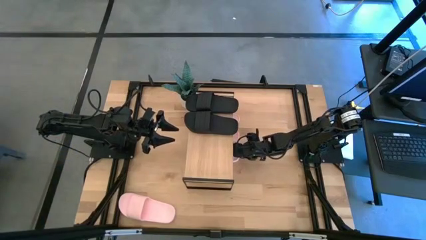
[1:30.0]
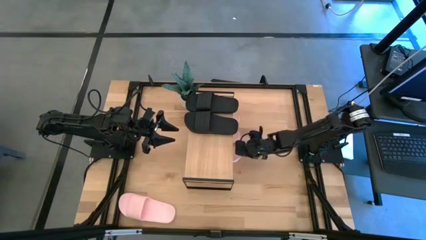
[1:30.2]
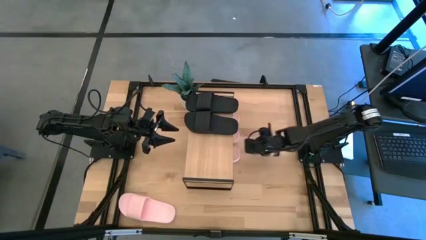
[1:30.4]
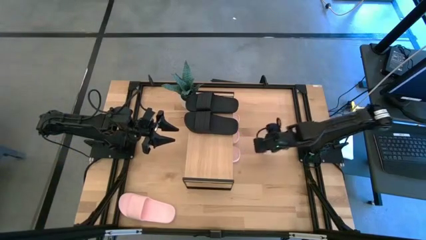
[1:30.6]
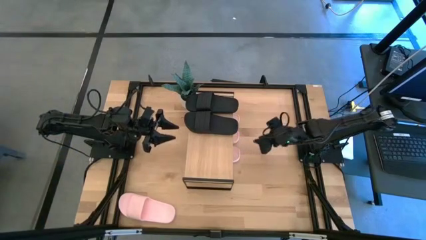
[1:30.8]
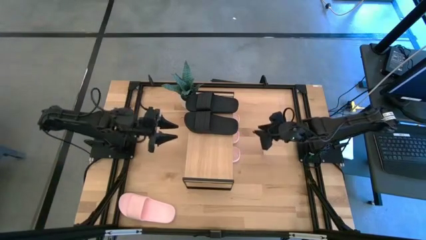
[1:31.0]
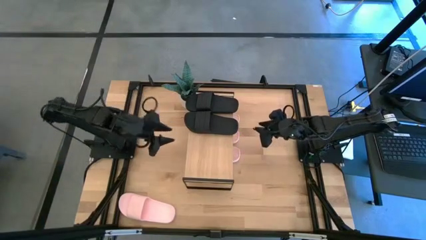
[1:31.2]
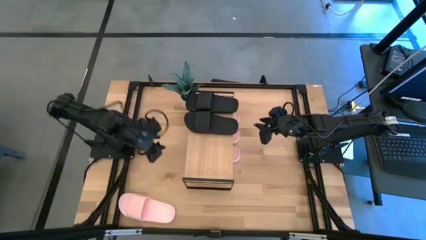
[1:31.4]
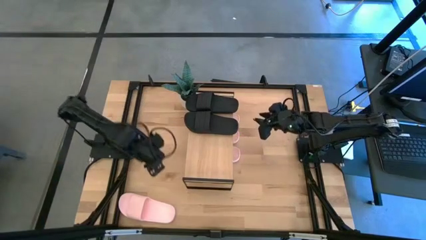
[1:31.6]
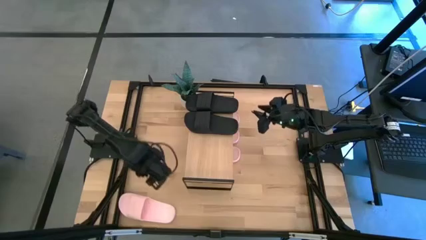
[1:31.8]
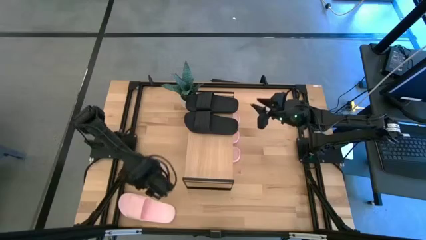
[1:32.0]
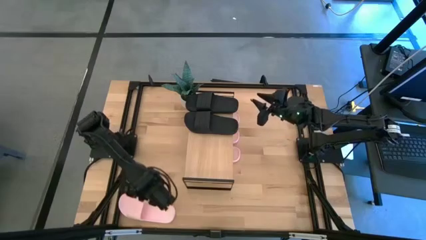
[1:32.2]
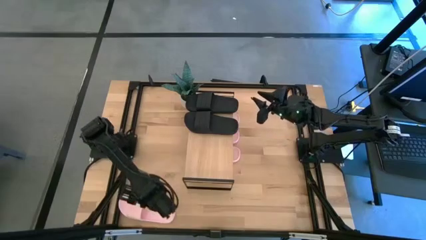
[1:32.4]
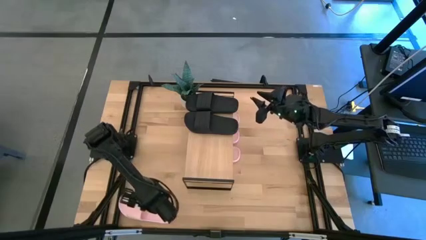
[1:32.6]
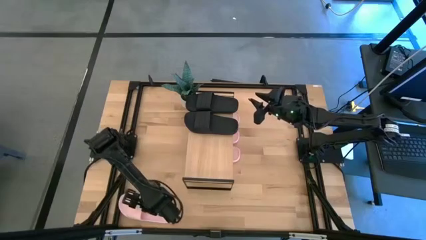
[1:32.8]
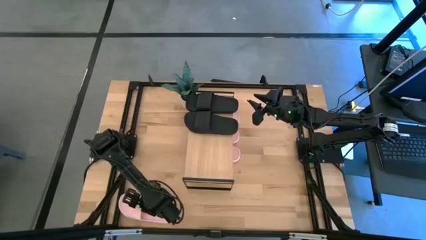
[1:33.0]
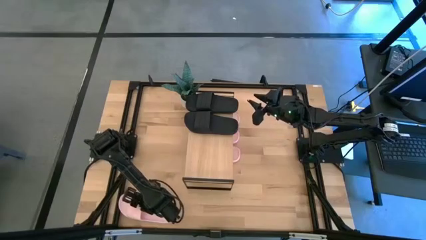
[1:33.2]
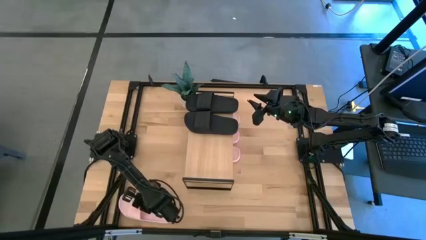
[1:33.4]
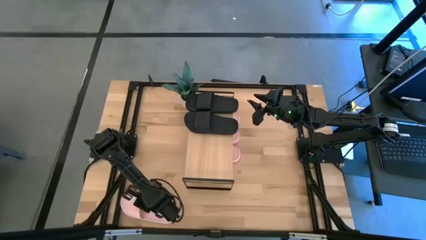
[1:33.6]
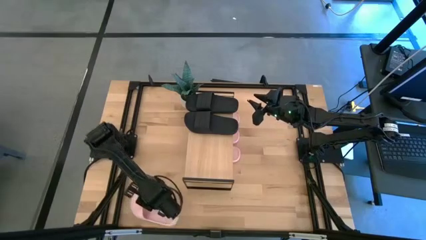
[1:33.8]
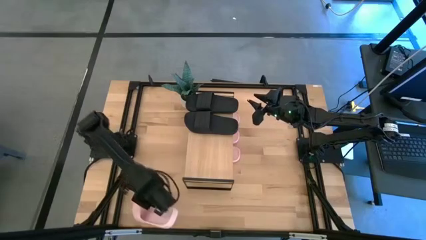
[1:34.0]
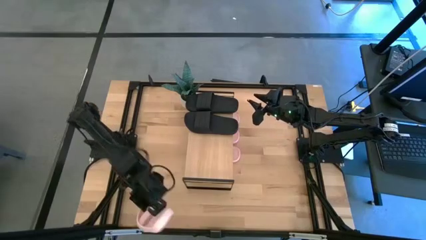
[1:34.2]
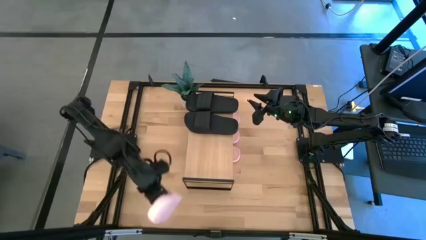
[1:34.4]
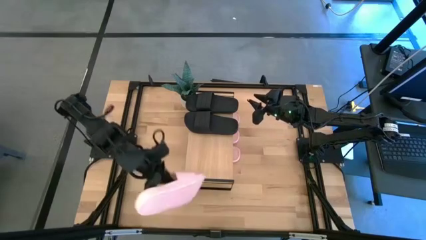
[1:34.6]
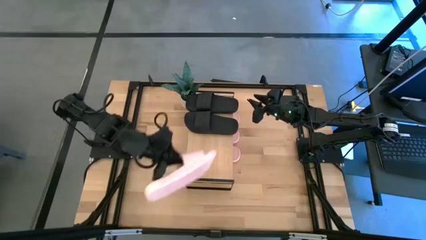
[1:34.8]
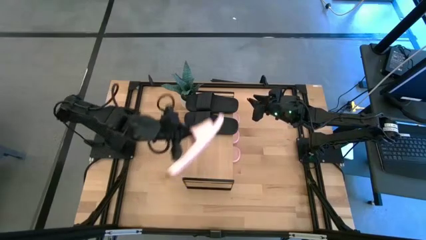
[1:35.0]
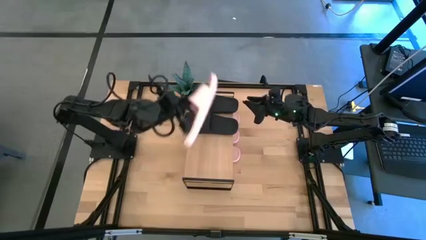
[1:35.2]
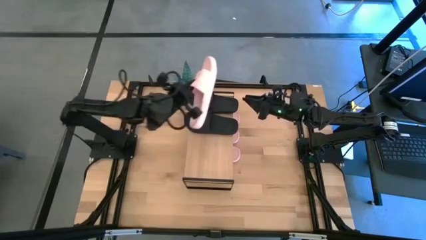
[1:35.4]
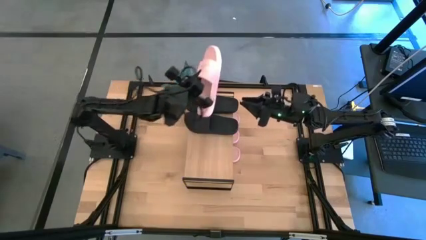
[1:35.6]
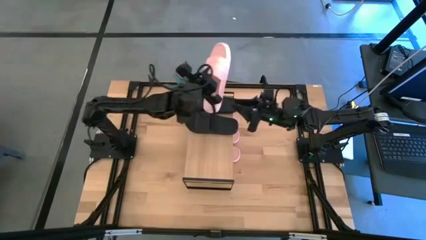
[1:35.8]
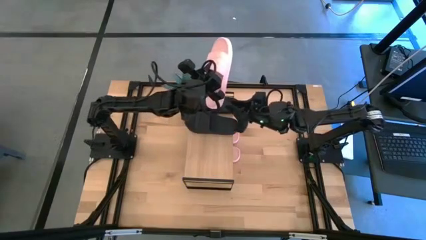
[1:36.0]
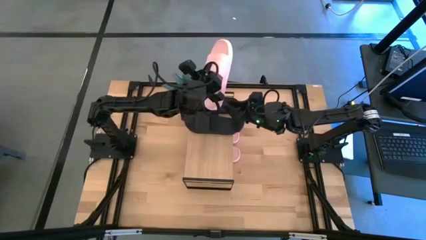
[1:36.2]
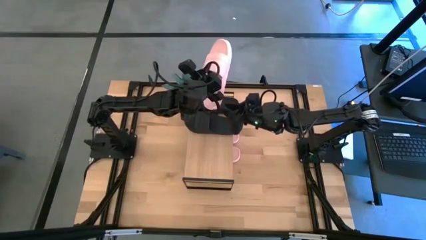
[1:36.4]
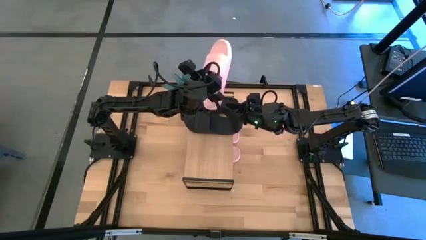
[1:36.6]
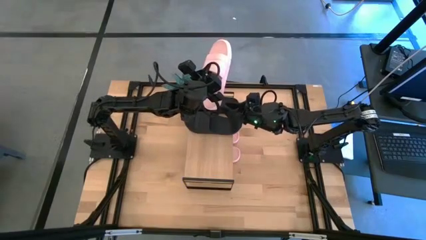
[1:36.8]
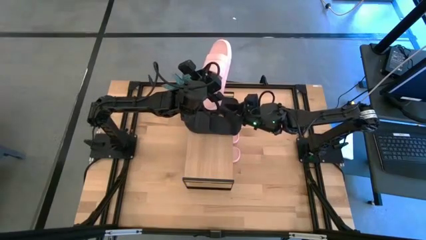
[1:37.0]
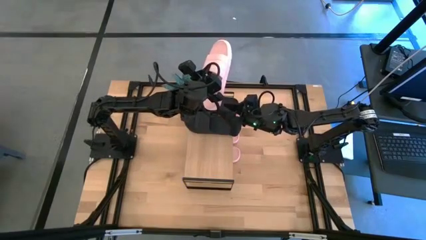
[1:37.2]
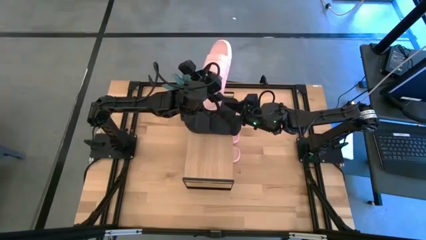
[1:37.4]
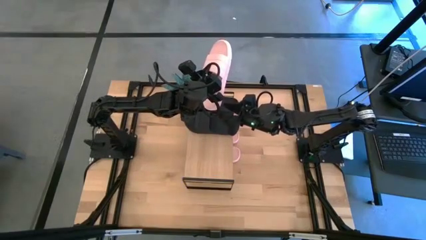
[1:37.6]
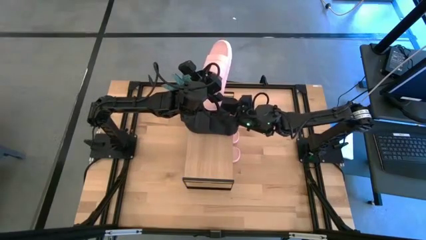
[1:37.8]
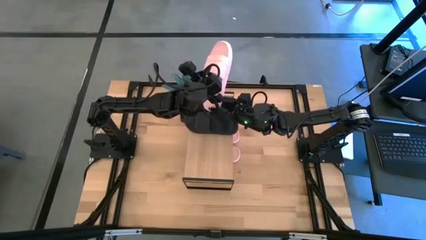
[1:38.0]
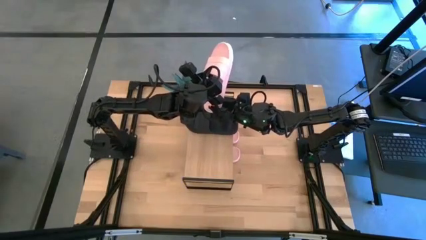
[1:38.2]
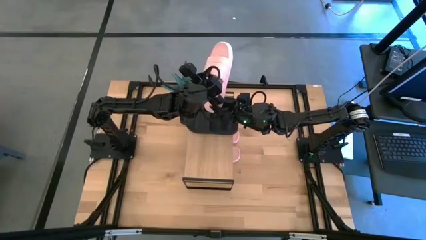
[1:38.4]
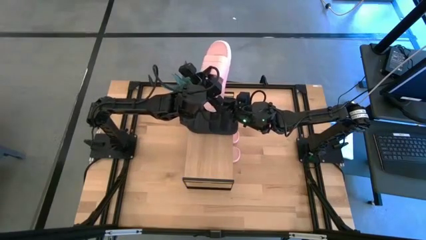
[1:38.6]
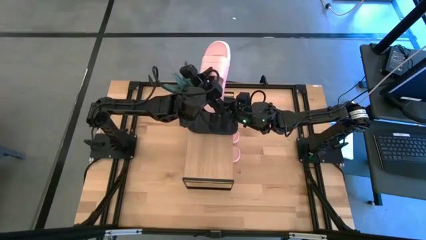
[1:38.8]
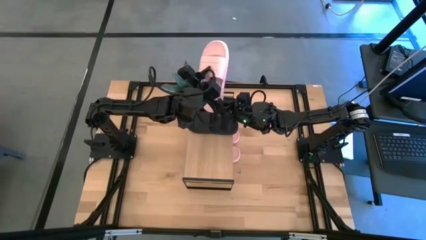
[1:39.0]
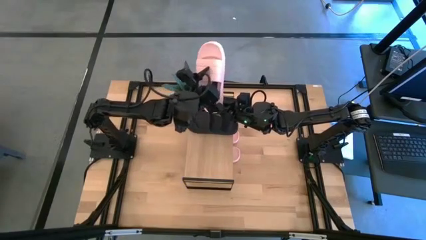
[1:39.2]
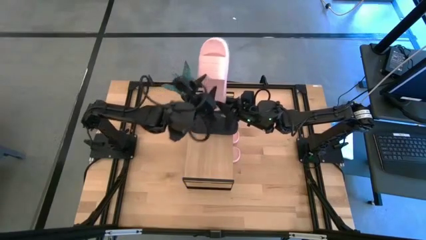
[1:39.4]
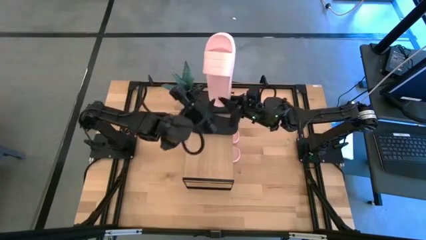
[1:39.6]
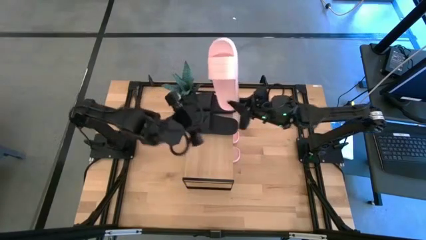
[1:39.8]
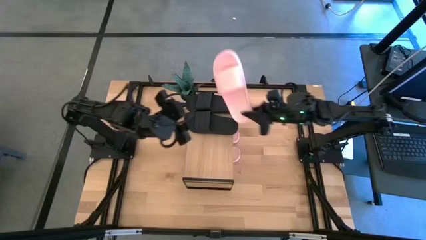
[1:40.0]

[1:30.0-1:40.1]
Task: Pick and place slides into the shelf
Put the pink slide under the shelf

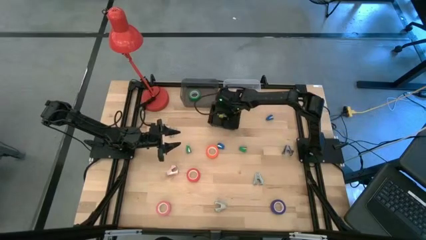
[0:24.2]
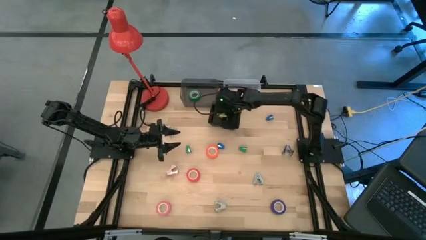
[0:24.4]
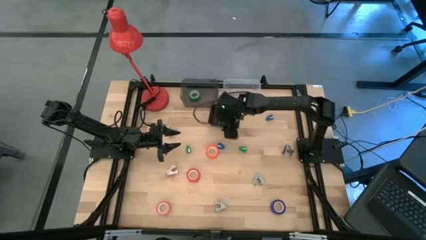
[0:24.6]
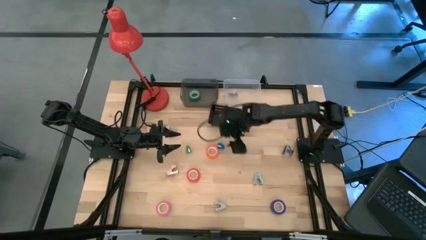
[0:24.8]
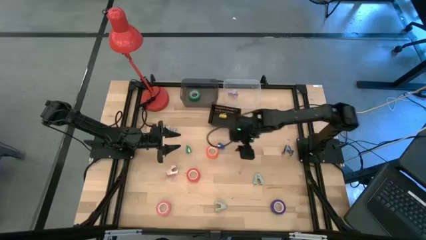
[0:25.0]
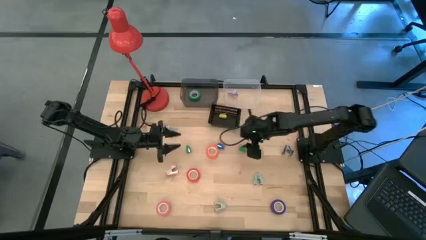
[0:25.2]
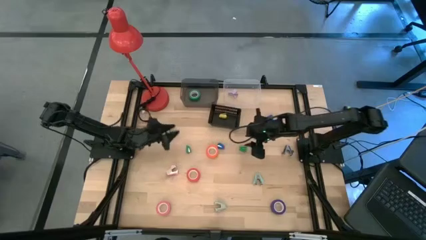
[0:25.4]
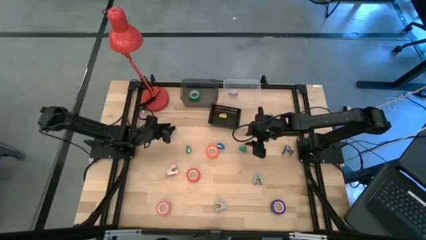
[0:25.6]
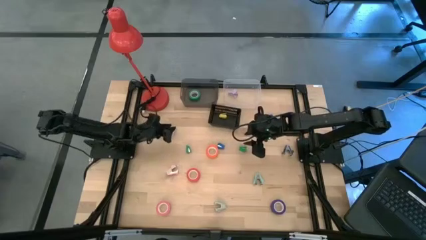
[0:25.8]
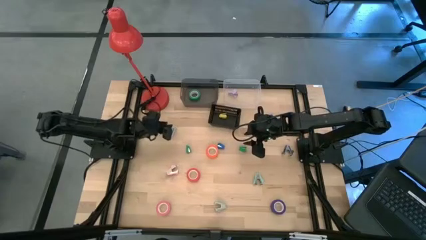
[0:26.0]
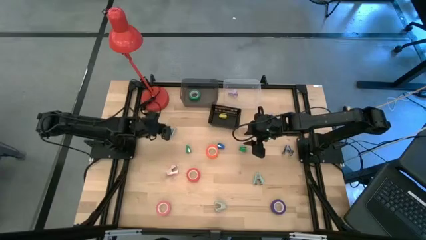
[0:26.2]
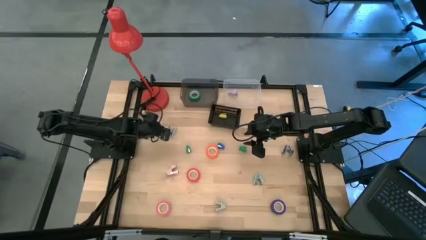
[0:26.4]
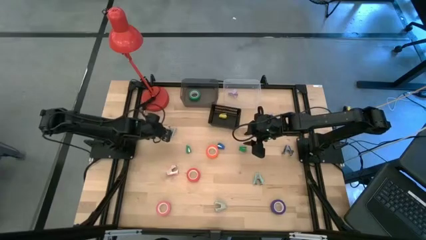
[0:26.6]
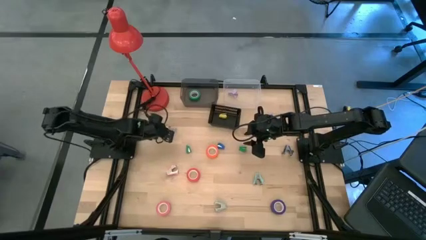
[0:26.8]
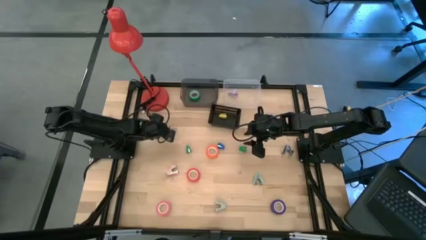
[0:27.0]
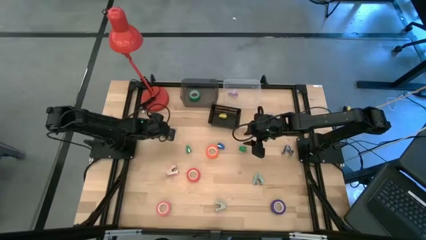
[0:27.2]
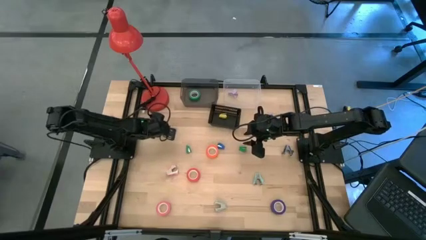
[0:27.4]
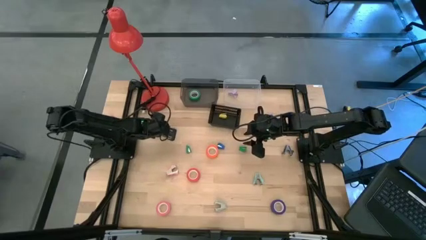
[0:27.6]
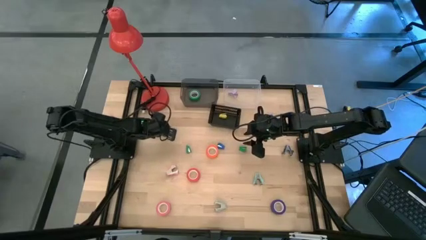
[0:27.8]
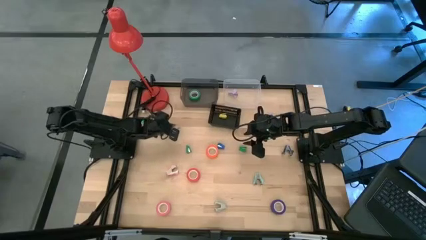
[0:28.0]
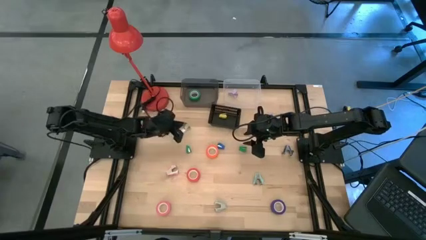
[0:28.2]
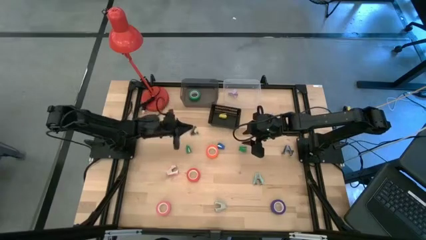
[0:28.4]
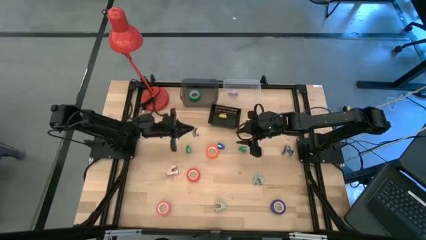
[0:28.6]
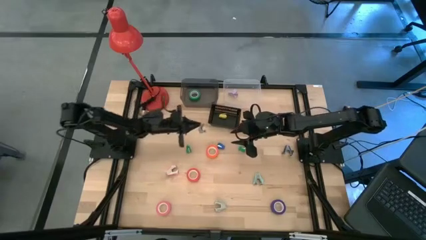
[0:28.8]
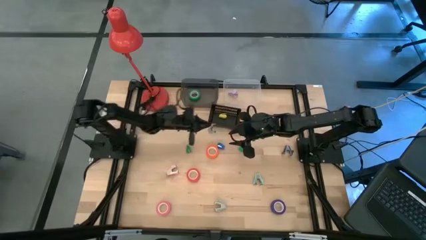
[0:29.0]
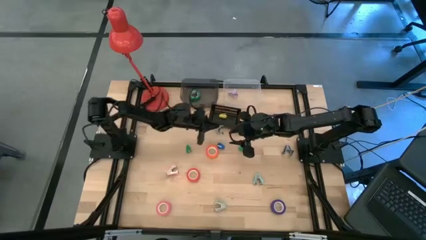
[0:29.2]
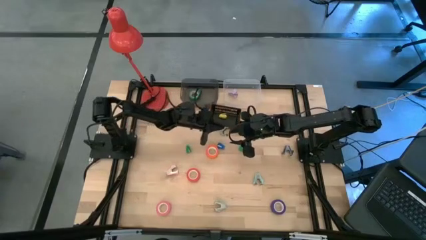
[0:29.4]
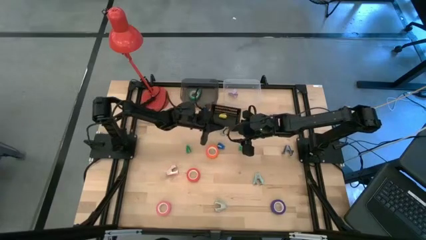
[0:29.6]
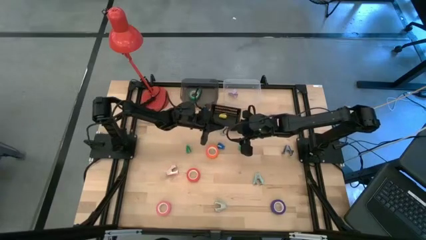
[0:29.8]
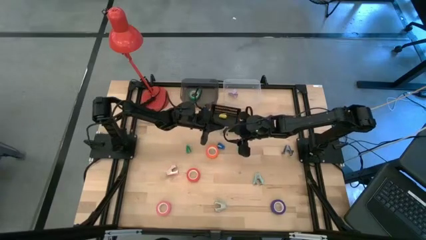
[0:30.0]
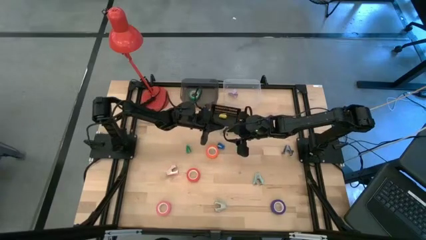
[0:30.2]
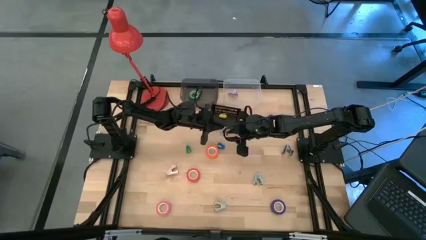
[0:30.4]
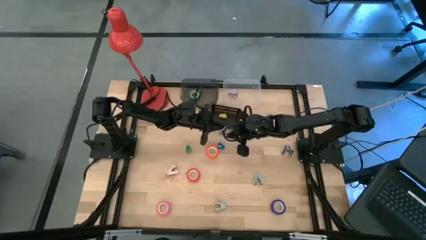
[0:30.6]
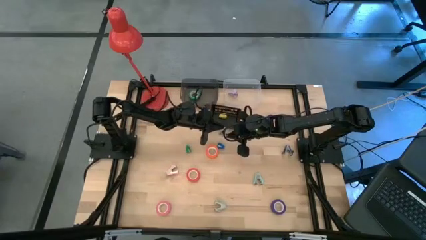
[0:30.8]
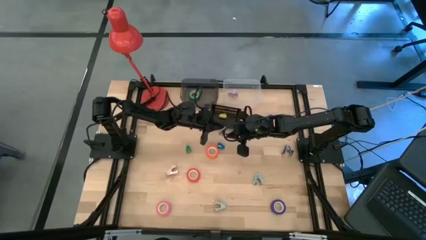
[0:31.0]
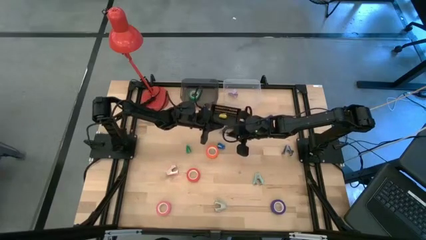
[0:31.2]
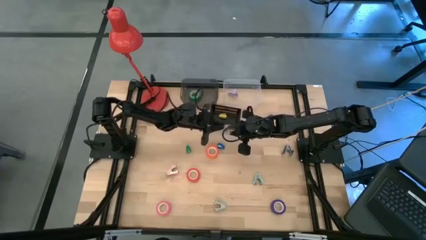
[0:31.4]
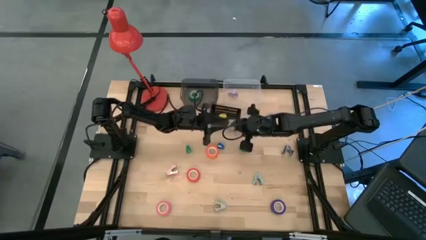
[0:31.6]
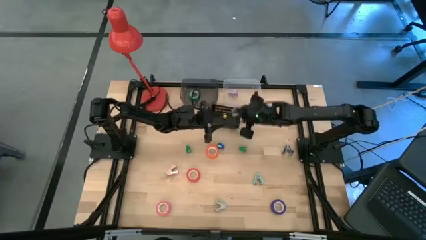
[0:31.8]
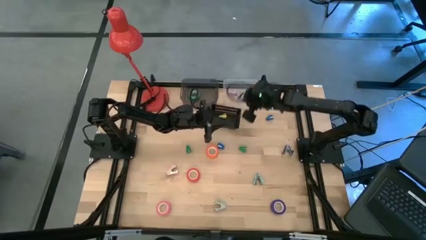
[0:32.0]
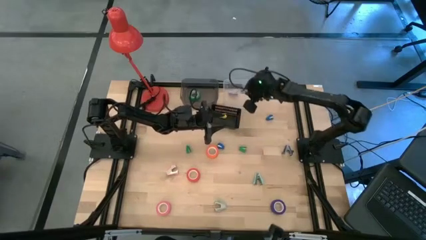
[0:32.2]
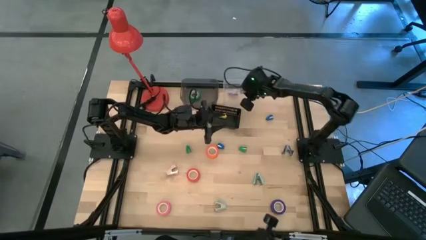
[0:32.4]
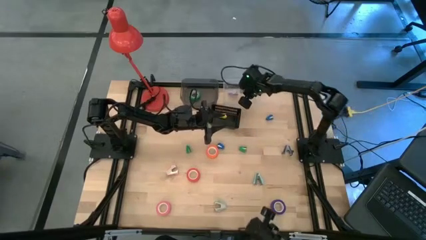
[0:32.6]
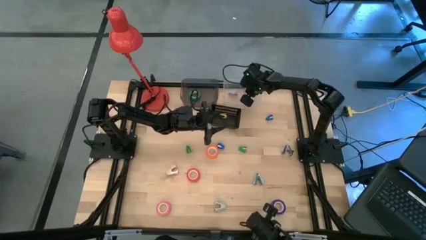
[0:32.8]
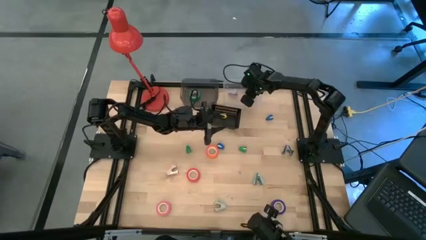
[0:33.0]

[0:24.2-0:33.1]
Task: Pick and place Stapler, Stapler remover, tape
Put the light blue staple remover into the transparent bin
